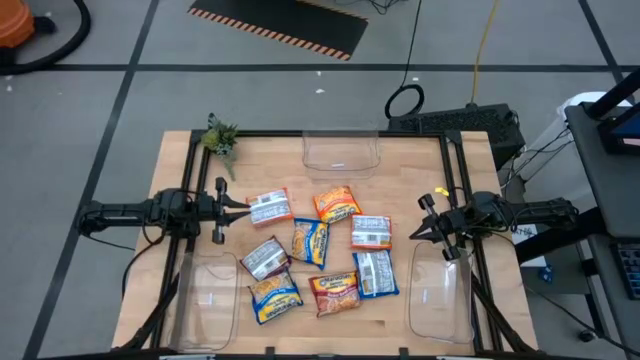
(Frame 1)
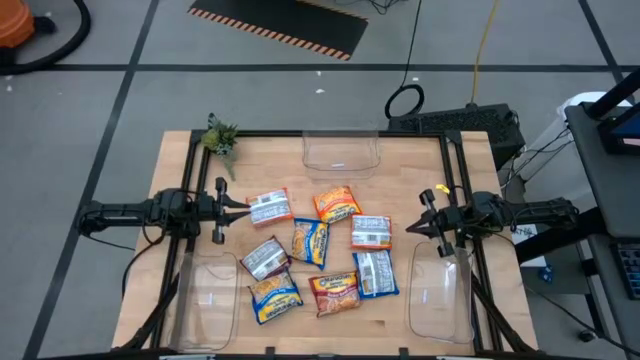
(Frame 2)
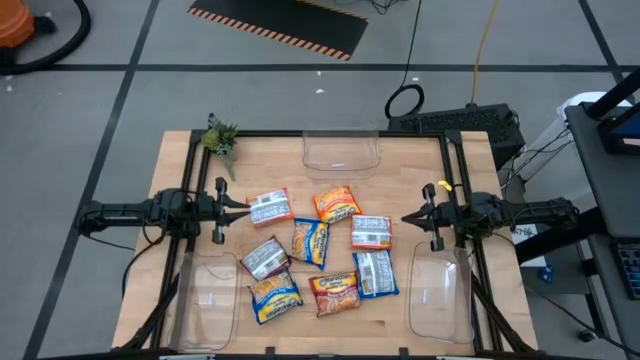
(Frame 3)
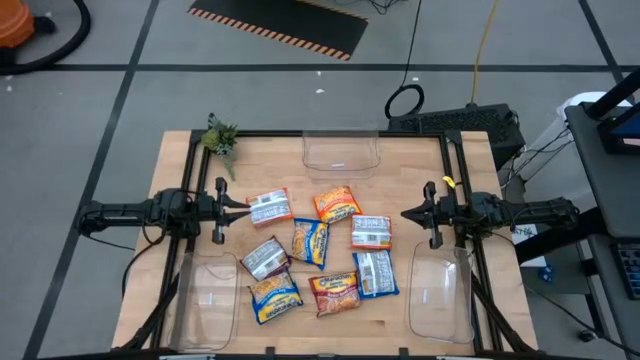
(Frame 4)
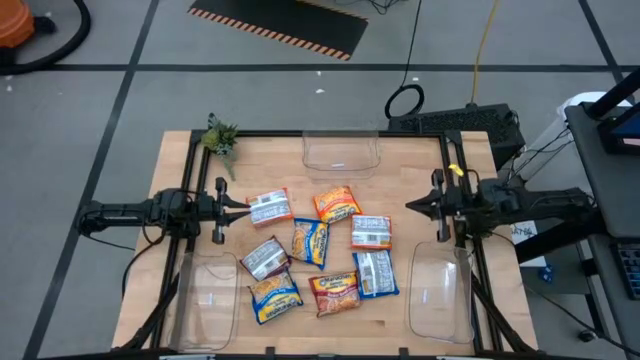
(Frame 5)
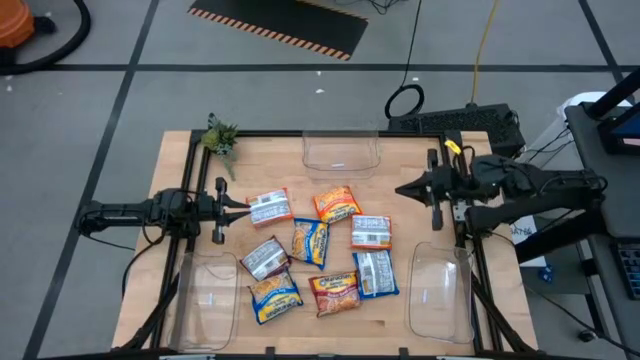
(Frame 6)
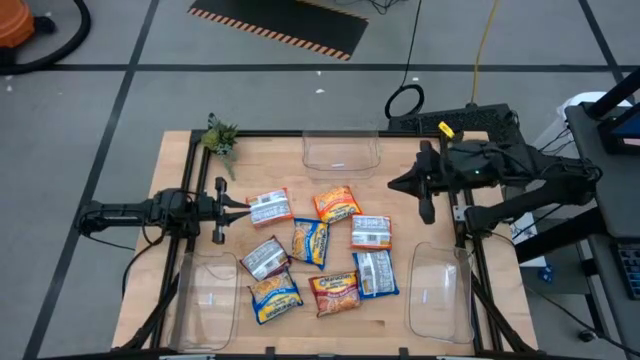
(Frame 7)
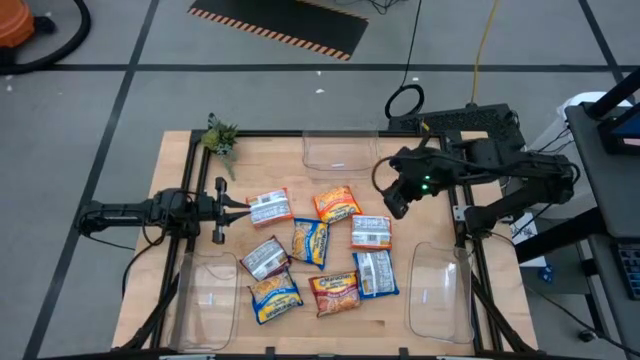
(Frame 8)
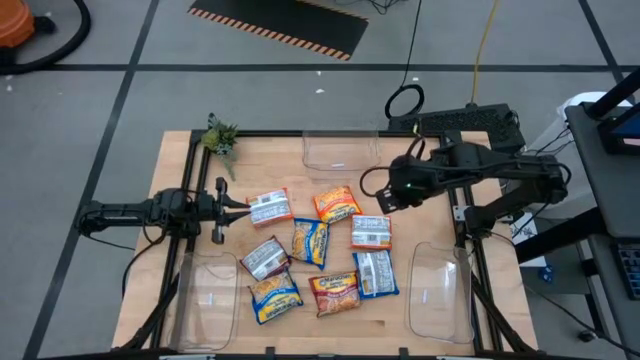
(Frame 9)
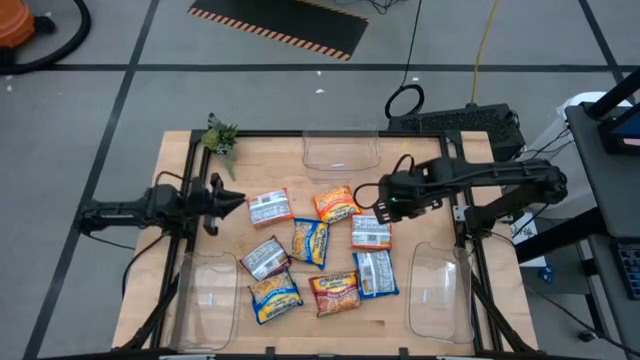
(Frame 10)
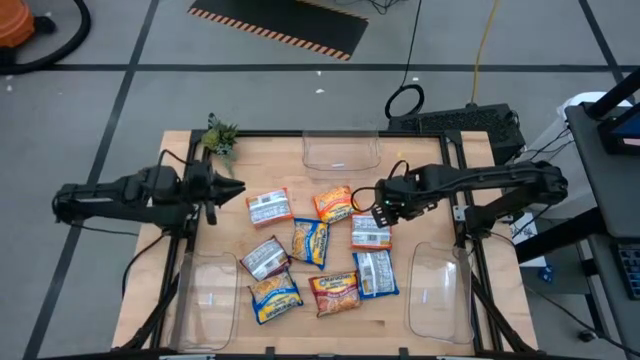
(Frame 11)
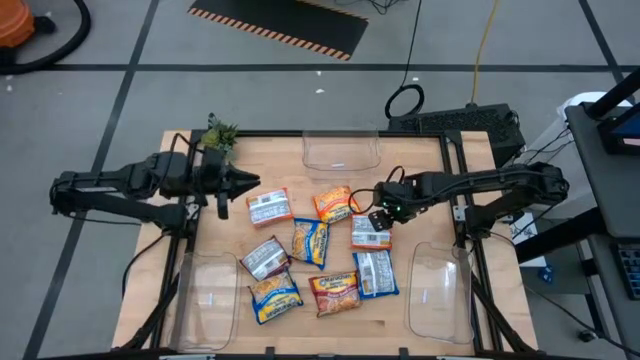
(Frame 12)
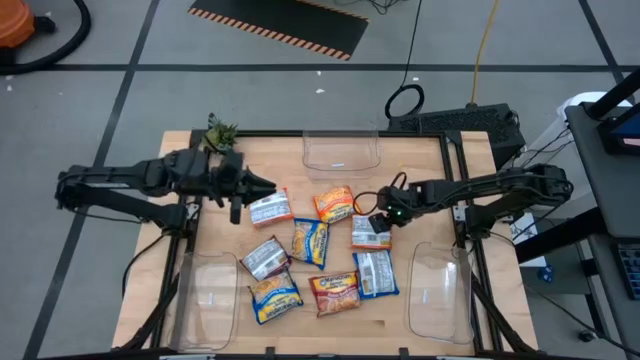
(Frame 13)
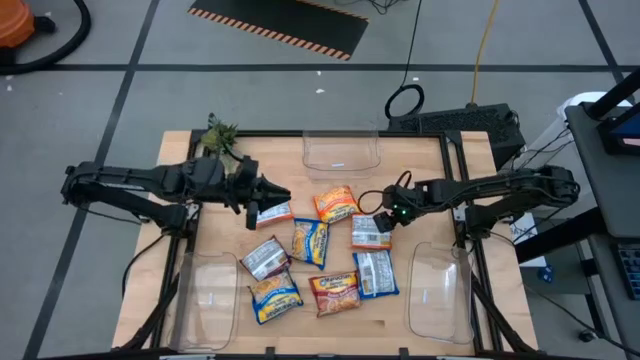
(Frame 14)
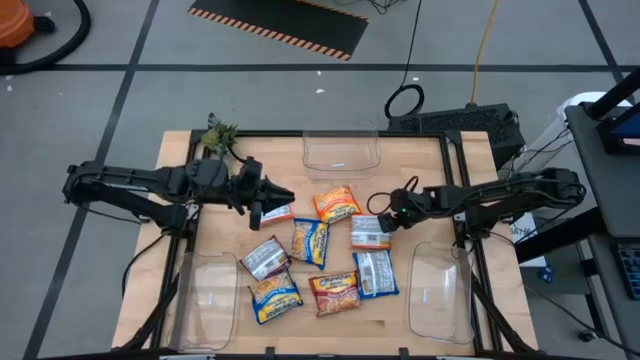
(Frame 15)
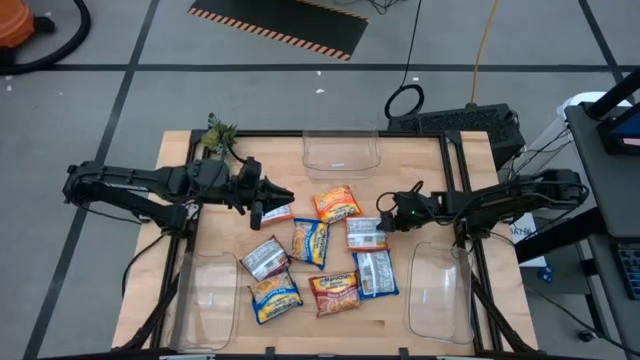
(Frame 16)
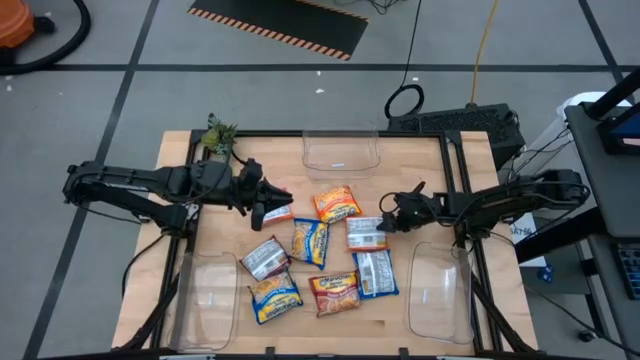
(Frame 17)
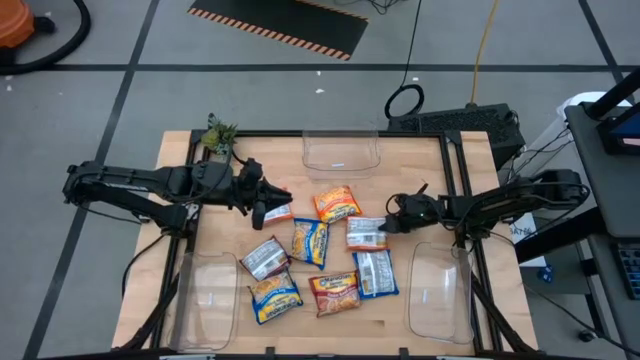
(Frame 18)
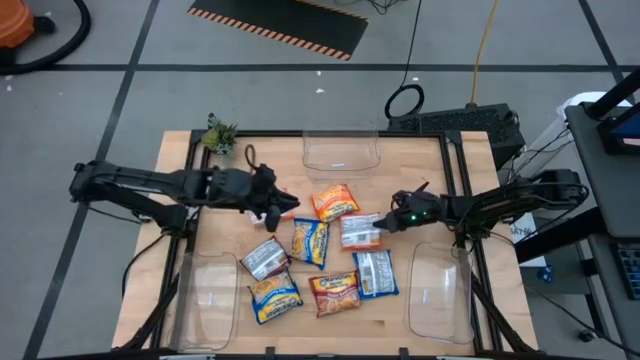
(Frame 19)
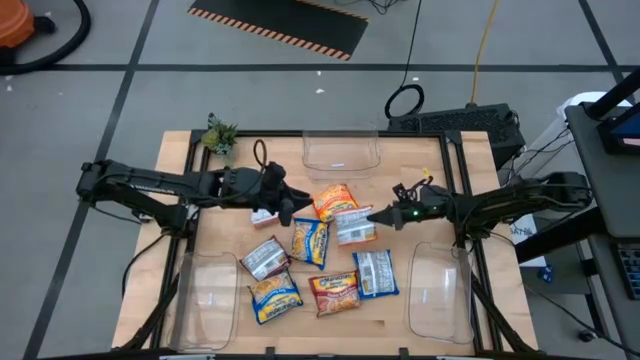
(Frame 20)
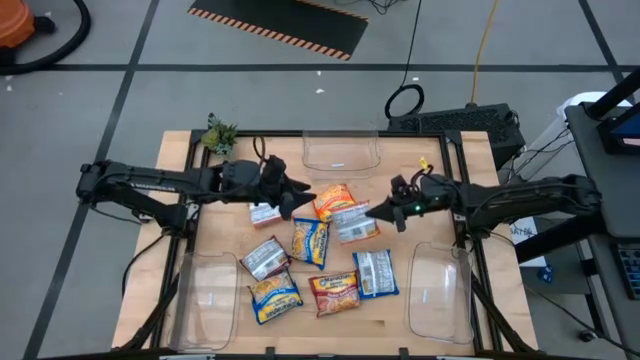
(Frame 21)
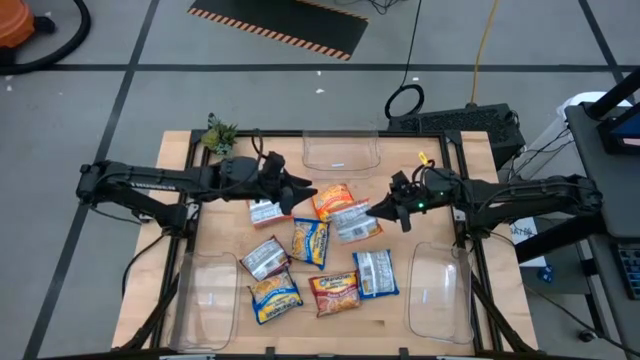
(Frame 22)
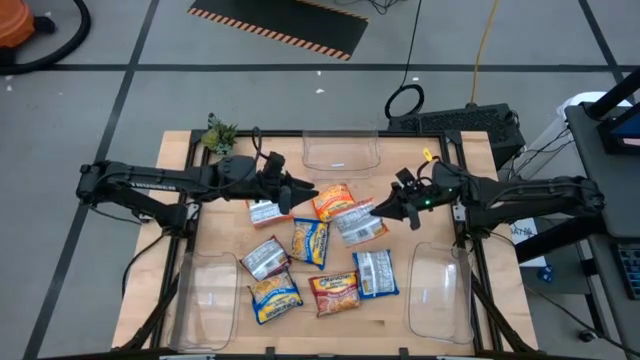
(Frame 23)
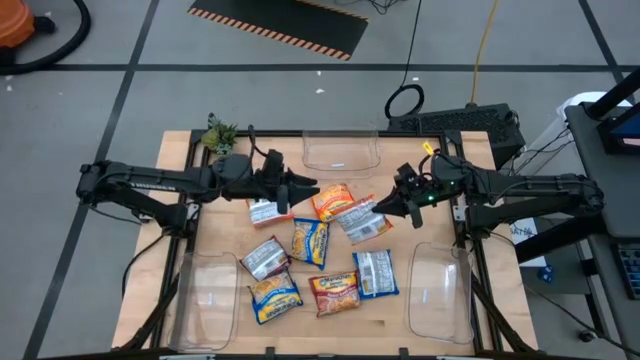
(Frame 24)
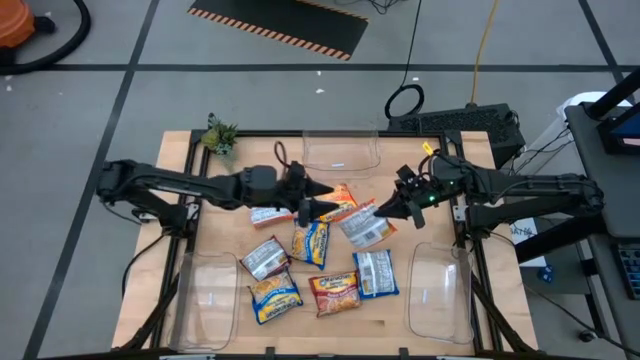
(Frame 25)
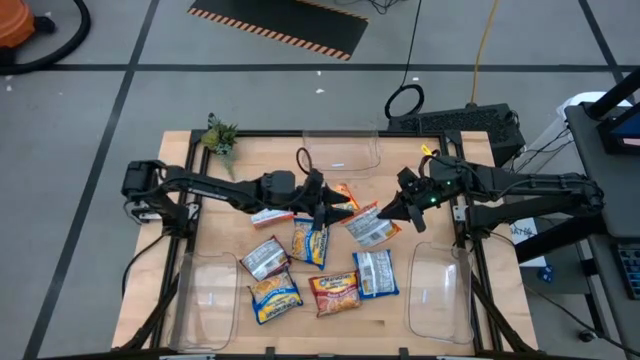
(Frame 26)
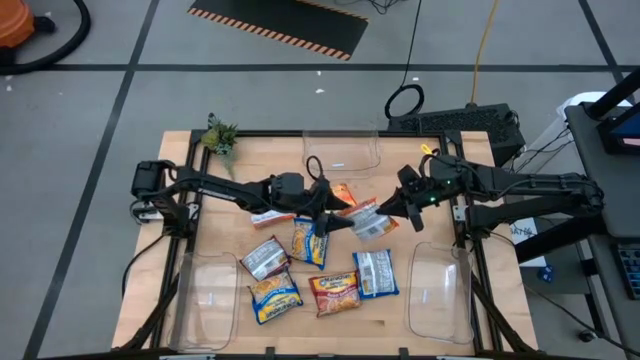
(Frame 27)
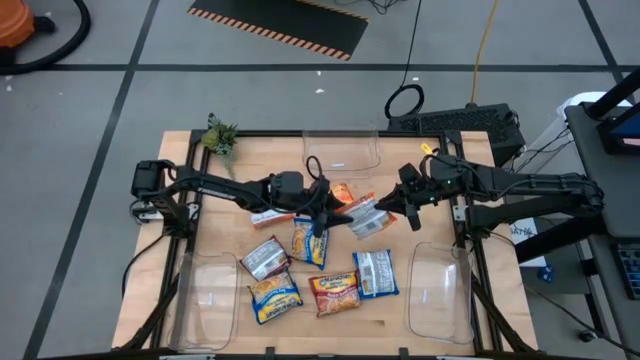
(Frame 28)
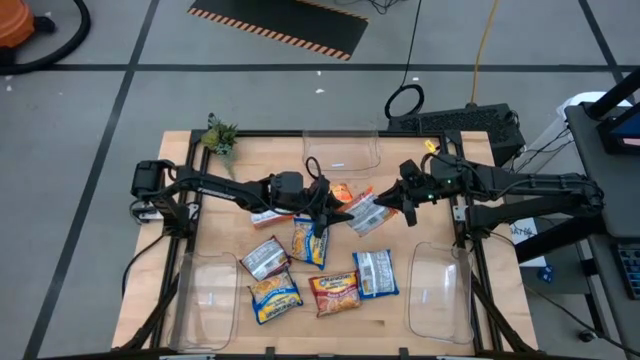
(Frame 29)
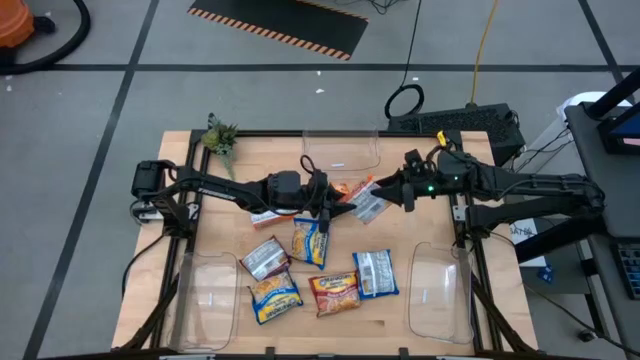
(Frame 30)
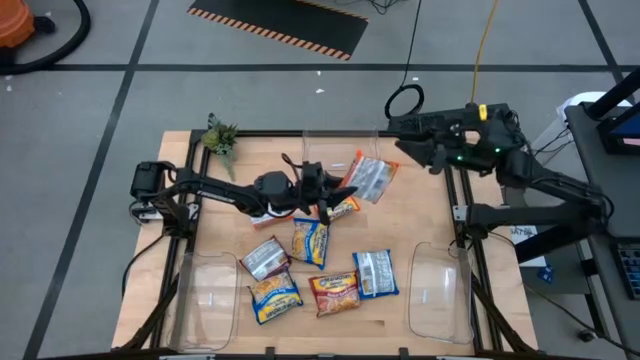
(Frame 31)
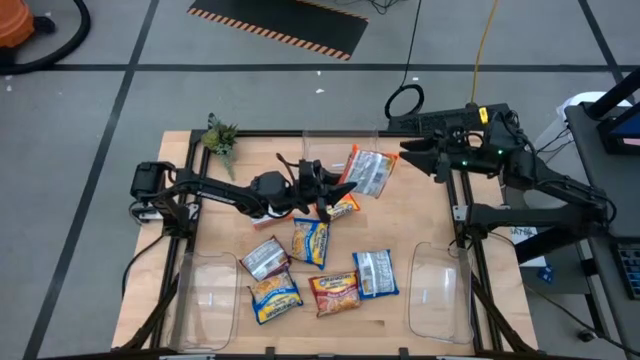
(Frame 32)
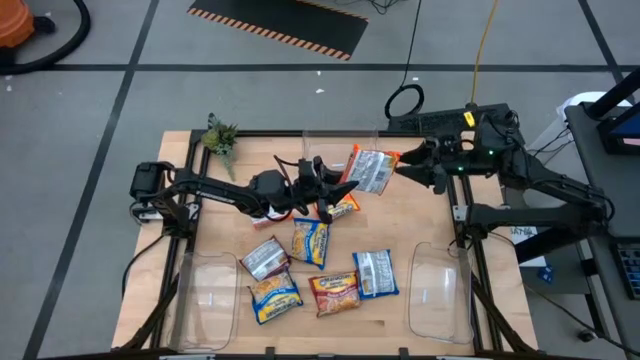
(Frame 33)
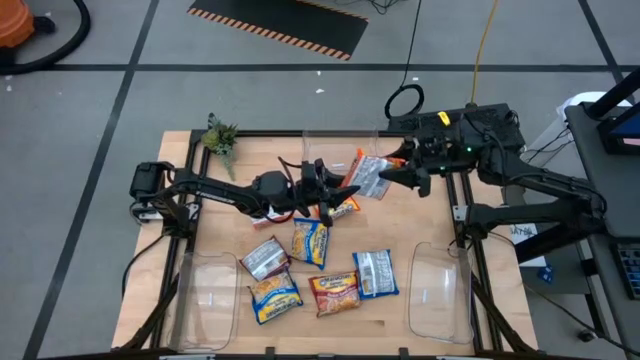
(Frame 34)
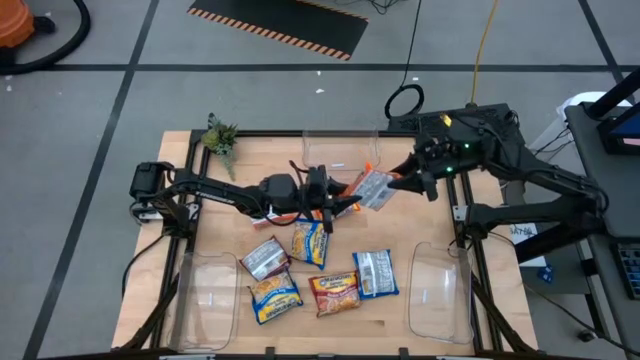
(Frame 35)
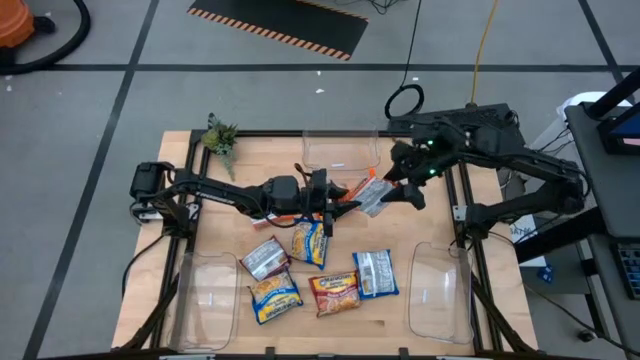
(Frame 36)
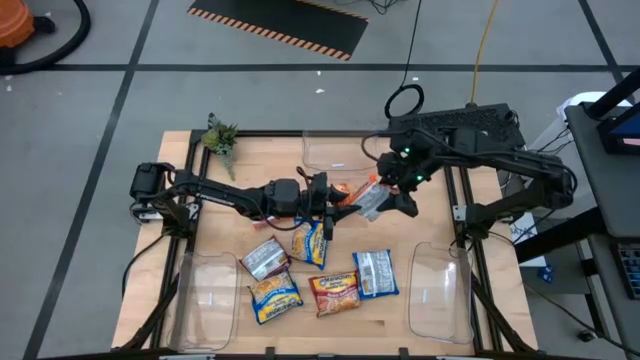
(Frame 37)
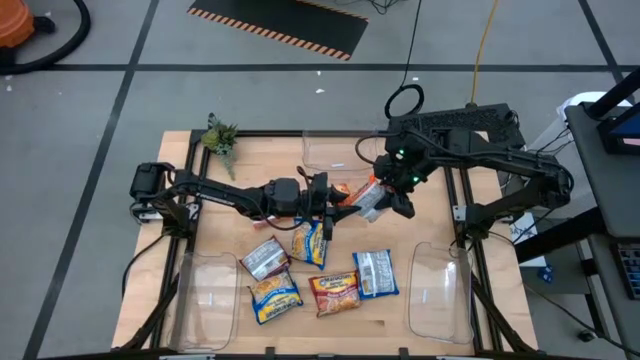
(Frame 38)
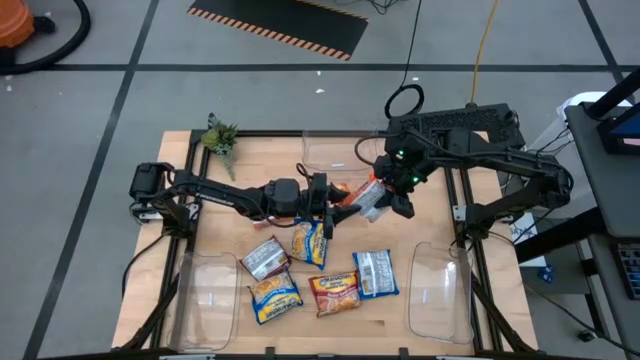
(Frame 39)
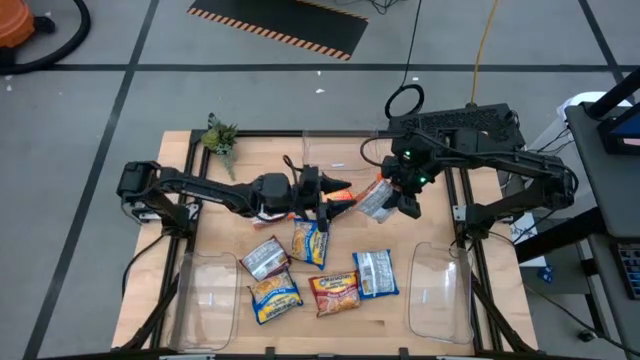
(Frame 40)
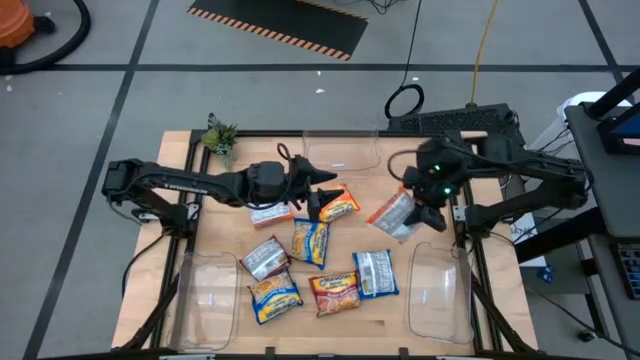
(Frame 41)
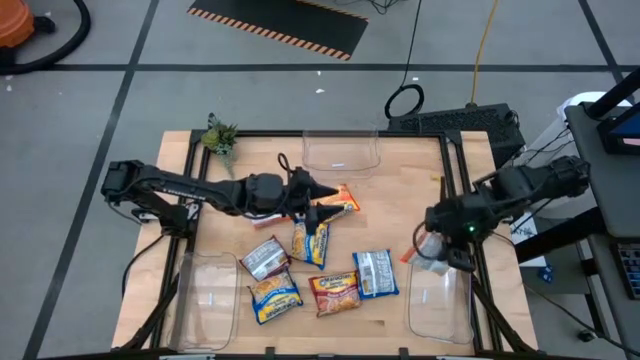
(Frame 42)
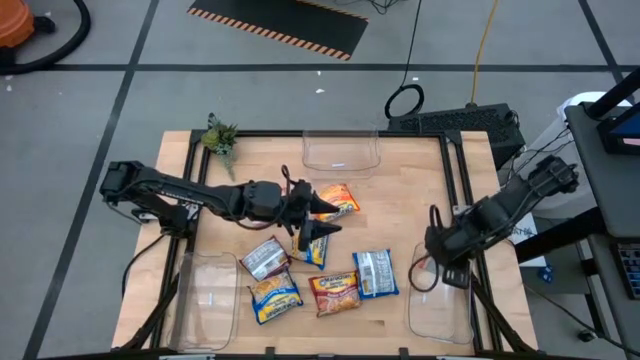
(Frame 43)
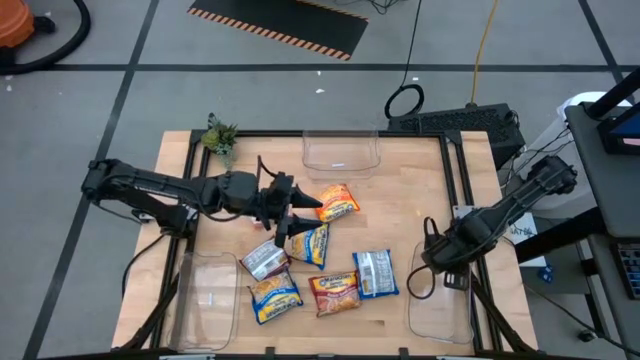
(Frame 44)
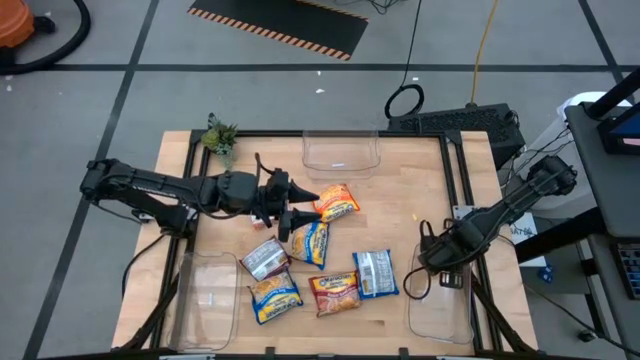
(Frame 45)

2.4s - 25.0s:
Task: Sort Maruchan noodles
Put the bottom orange noodle pack into the bottom right transparent bin
